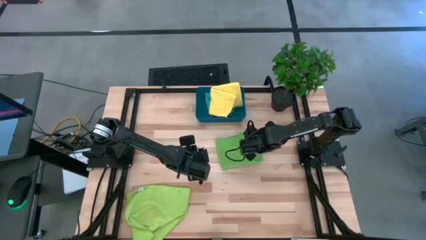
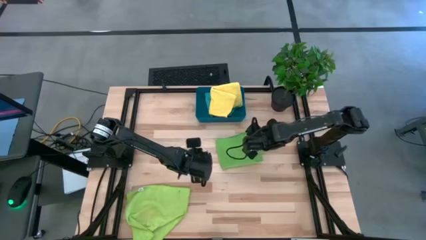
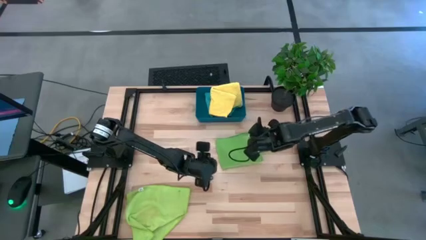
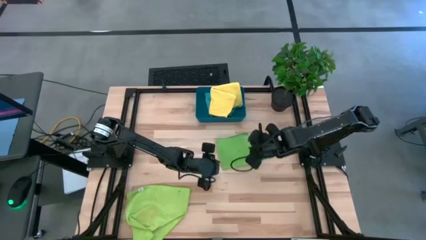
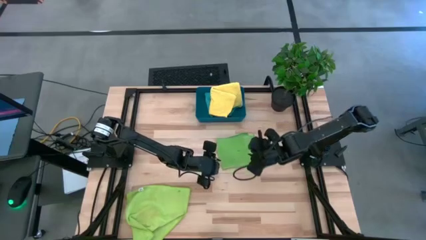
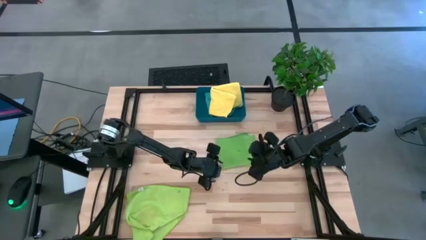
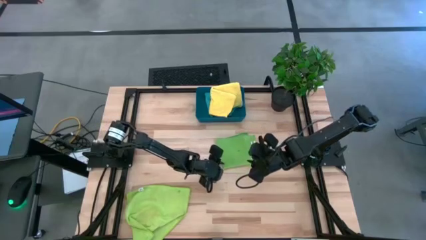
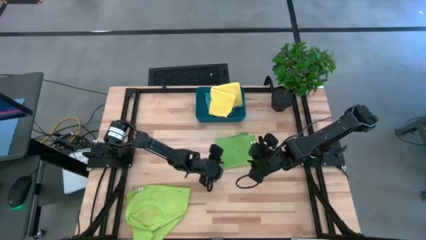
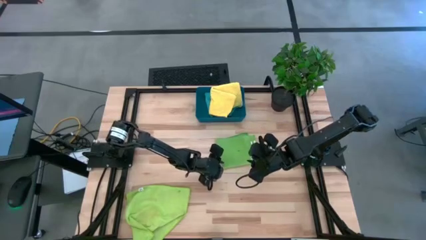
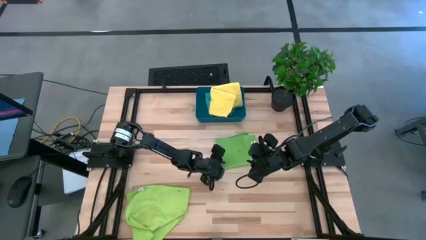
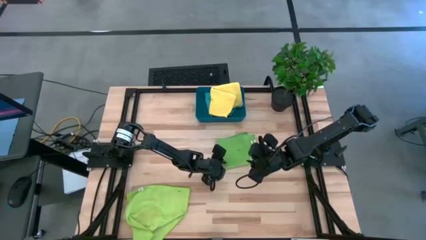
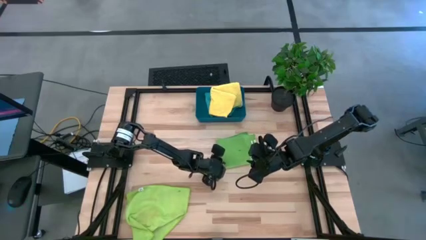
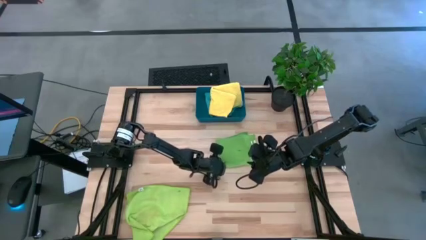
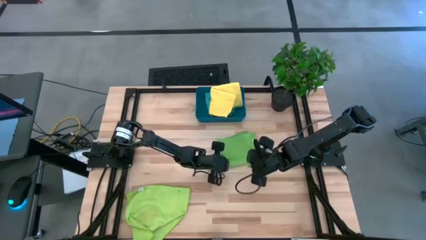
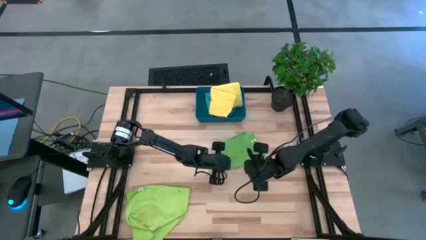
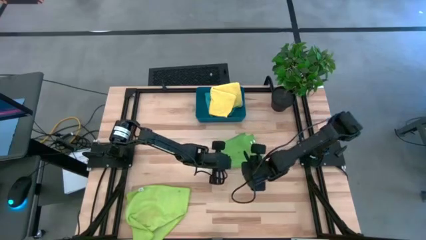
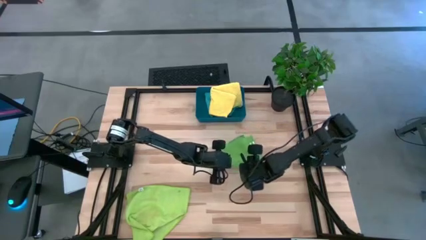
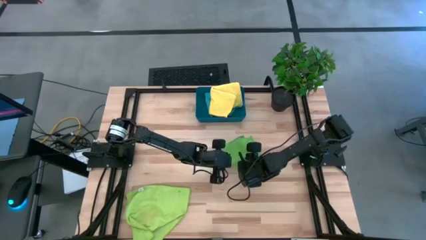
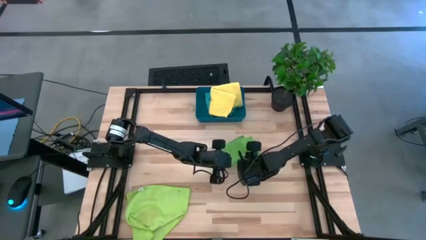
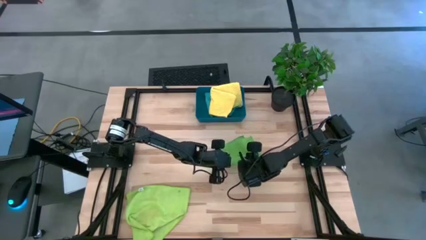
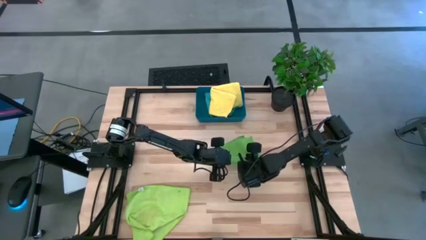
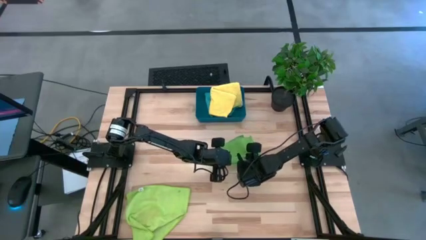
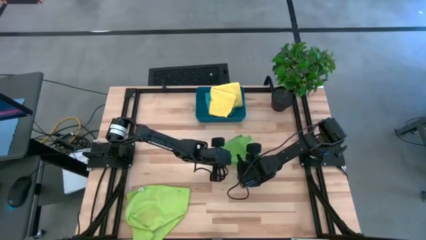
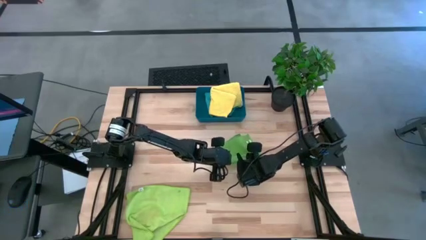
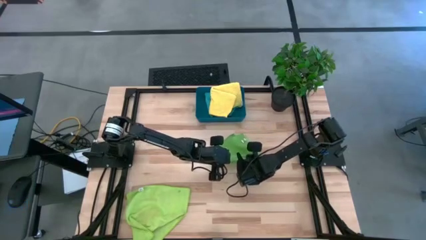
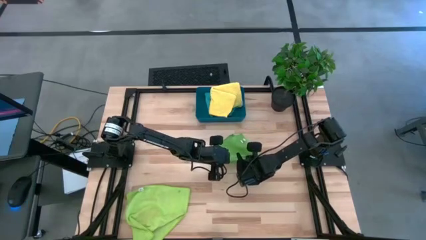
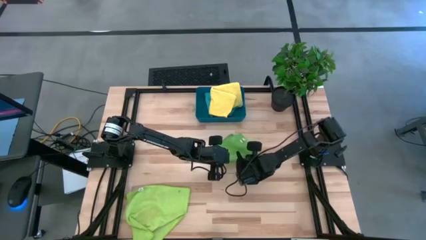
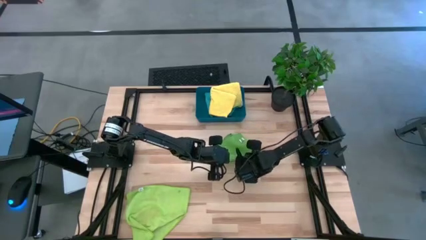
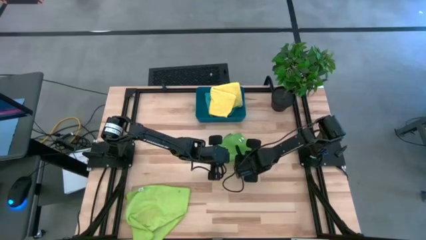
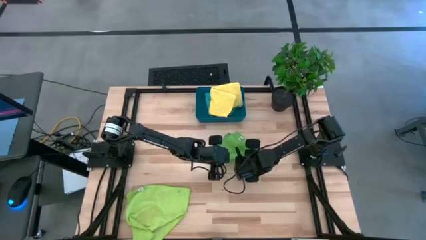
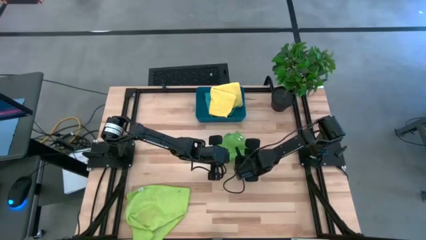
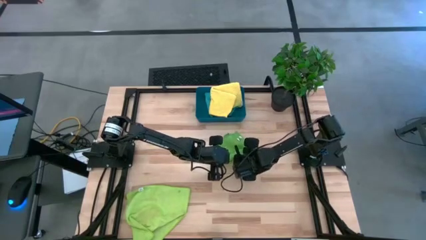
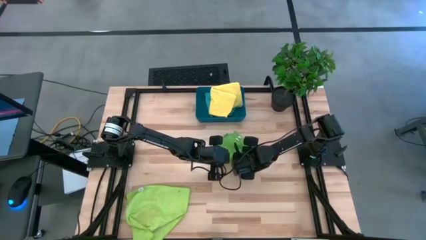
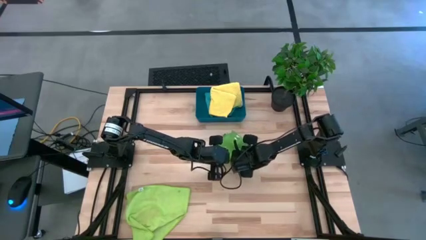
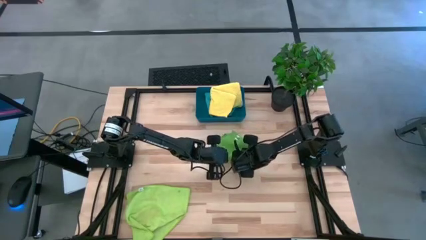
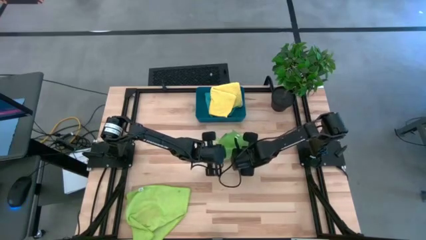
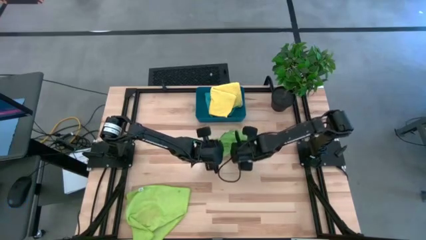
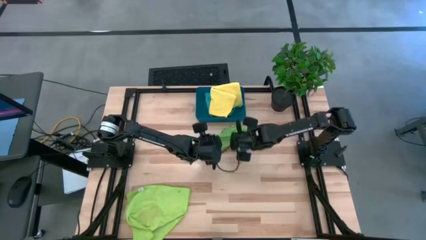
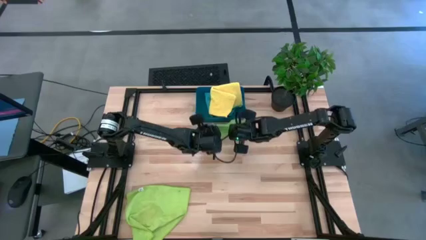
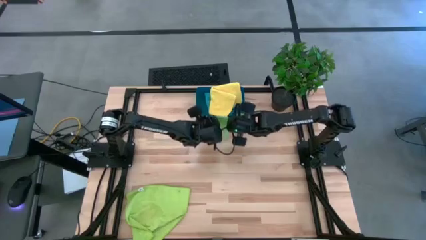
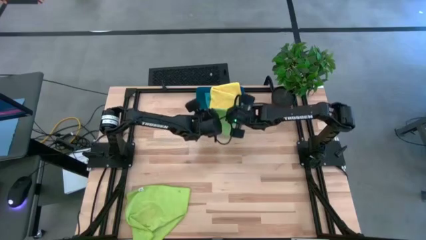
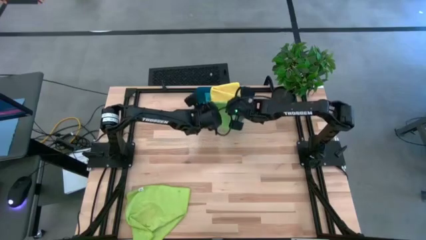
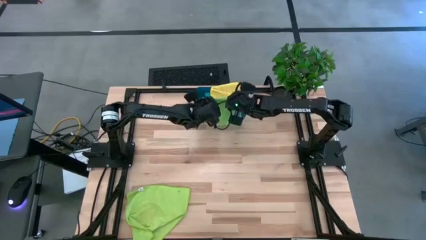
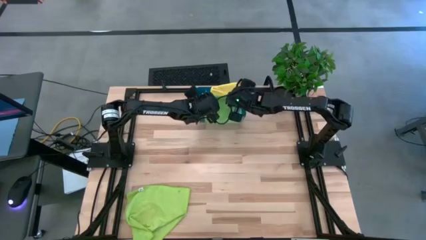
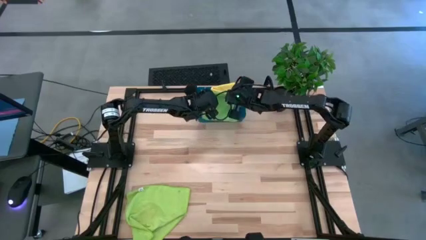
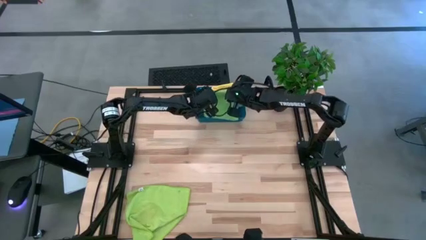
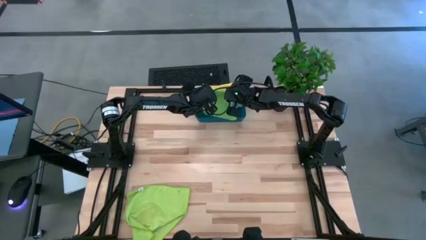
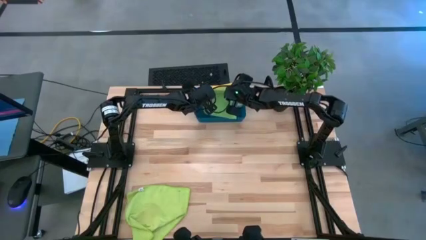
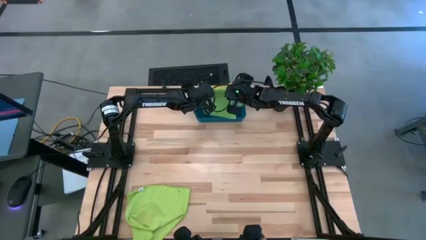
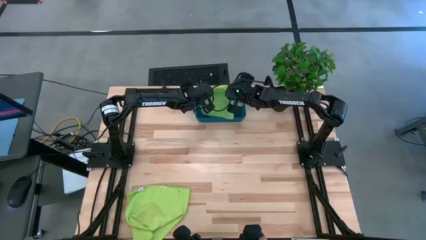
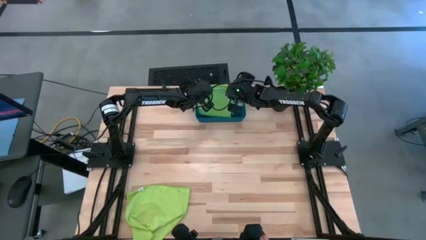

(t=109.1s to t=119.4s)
Task: Fold microfiber towels
Put the folded green microfiber cloth into the blue bin

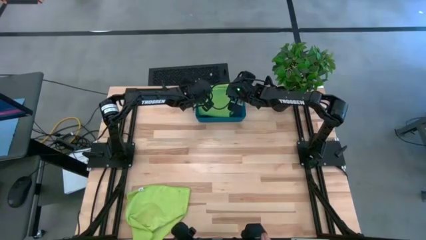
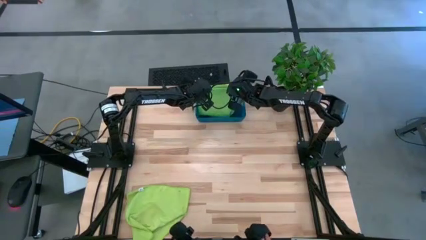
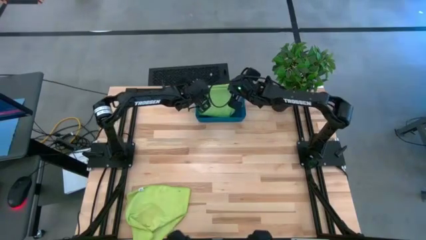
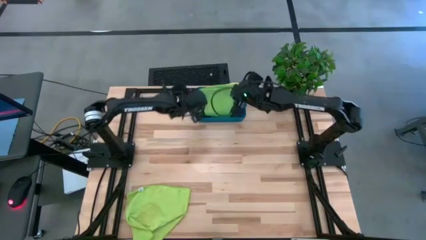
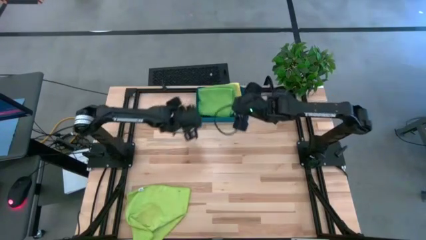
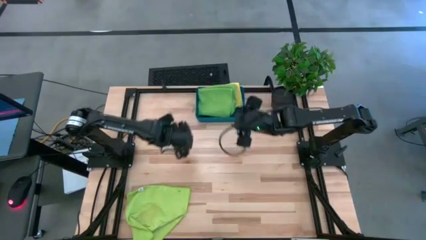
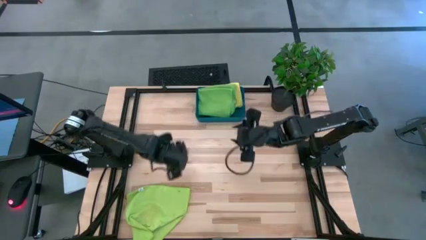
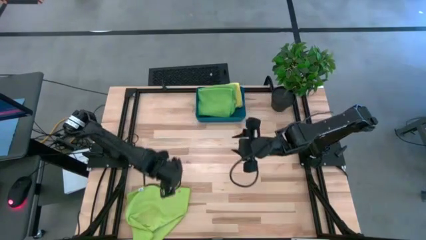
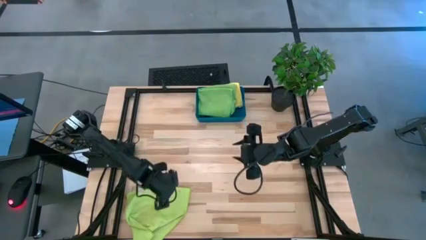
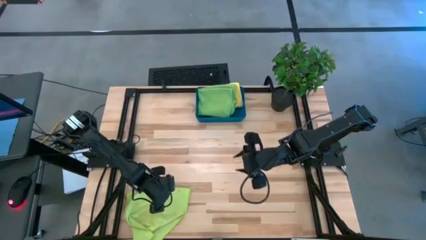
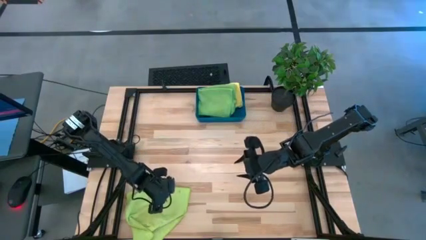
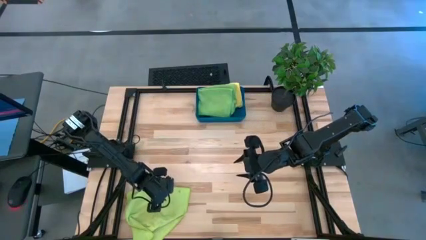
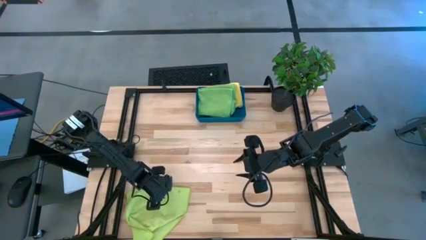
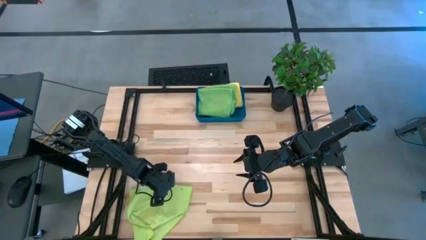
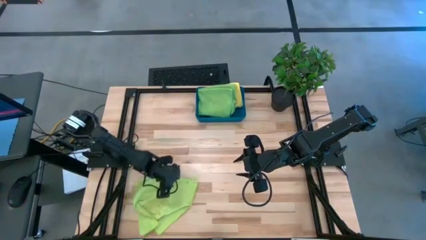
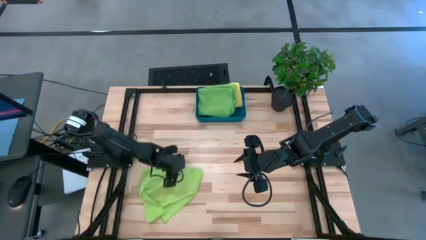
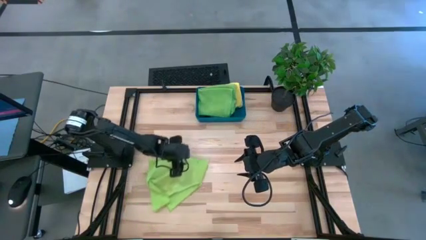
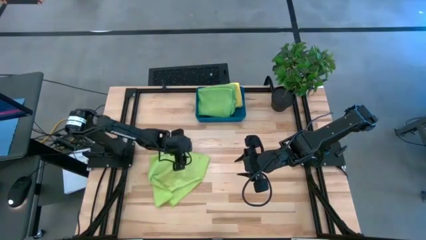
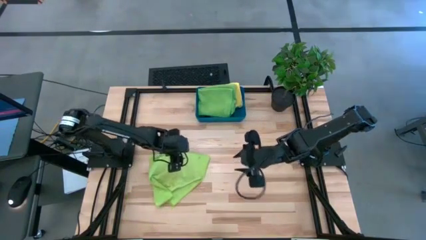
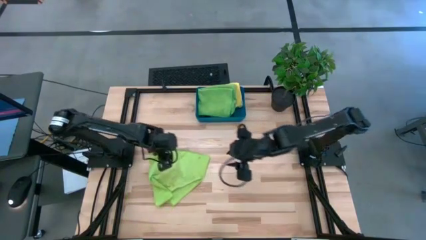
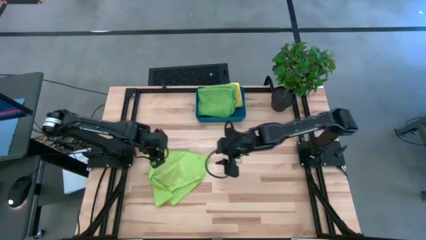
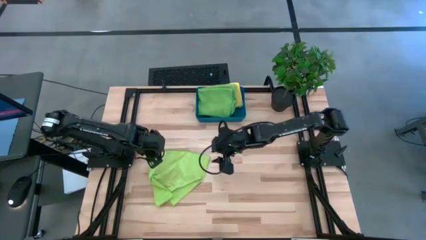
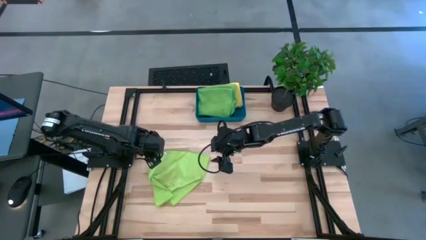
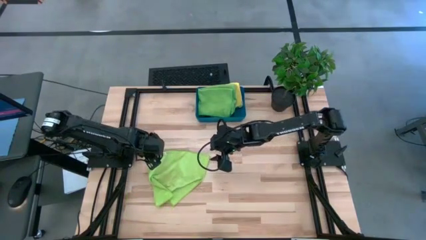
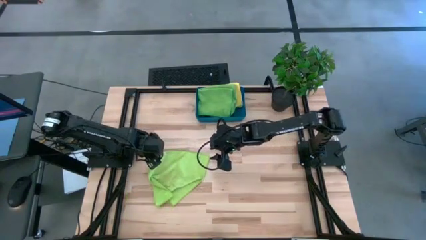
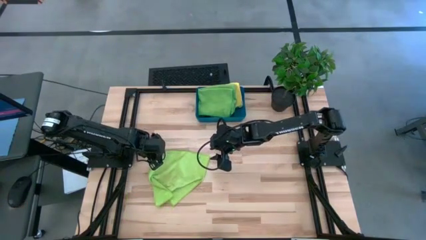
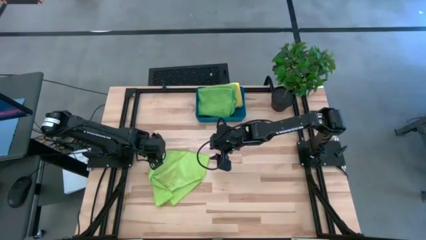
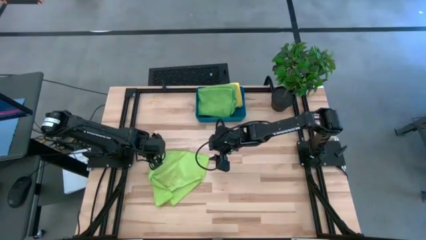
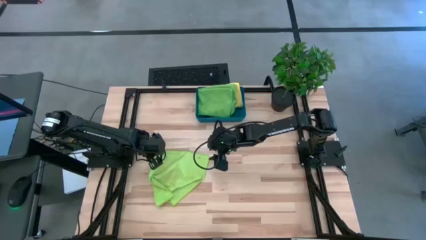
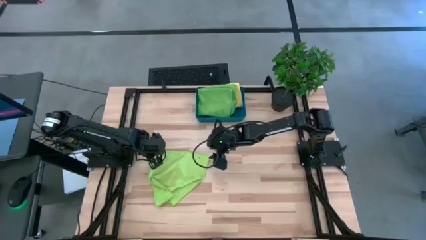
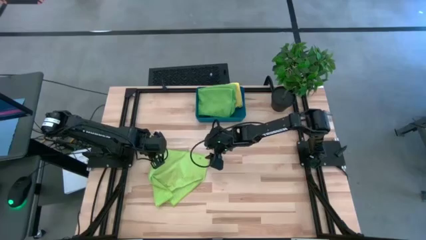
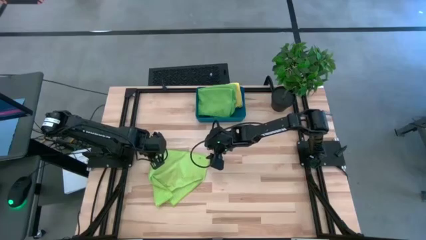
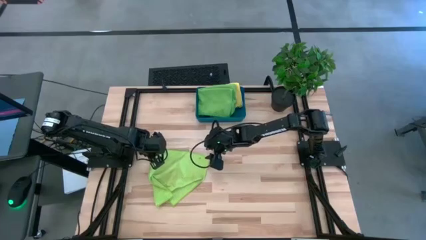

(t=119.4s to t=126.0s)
Fold the light green microfiber cloth
